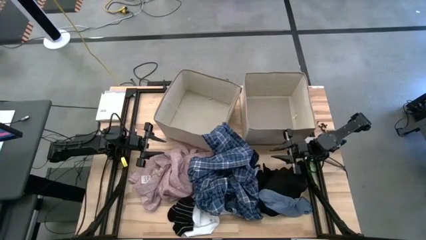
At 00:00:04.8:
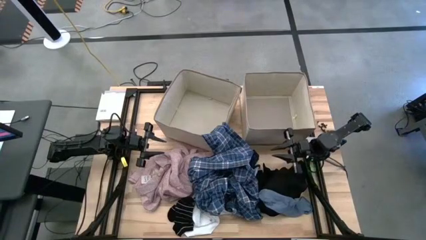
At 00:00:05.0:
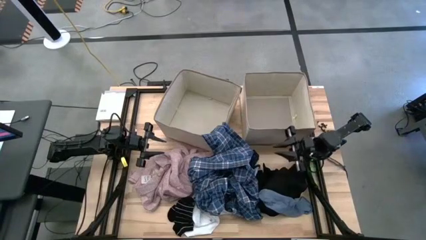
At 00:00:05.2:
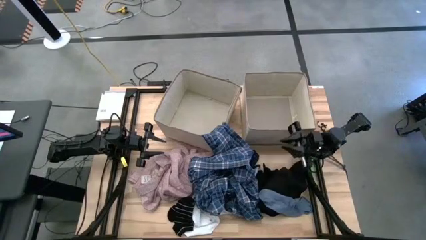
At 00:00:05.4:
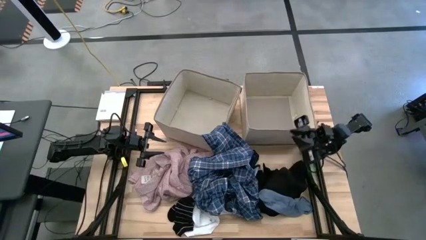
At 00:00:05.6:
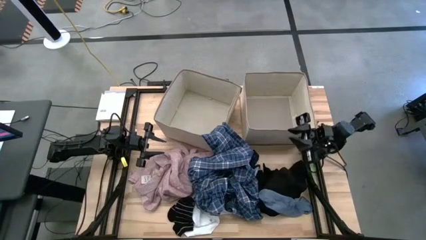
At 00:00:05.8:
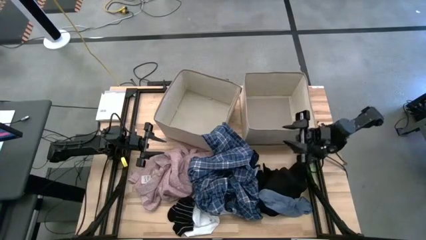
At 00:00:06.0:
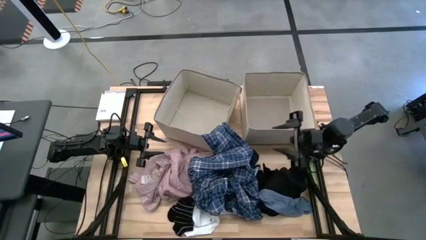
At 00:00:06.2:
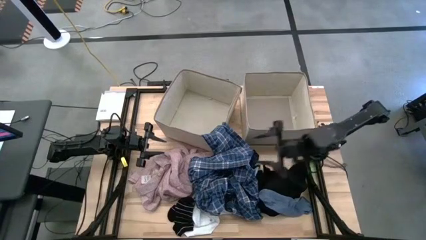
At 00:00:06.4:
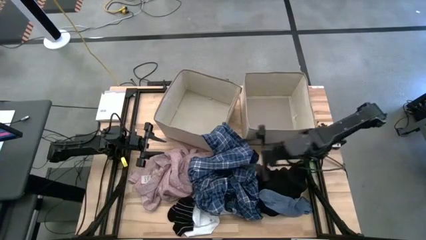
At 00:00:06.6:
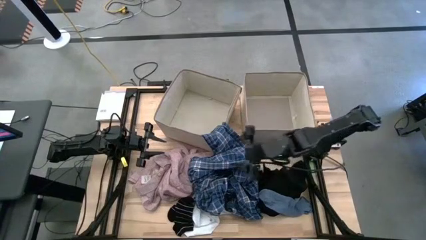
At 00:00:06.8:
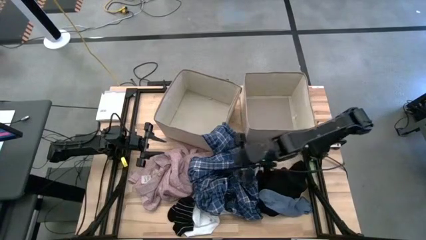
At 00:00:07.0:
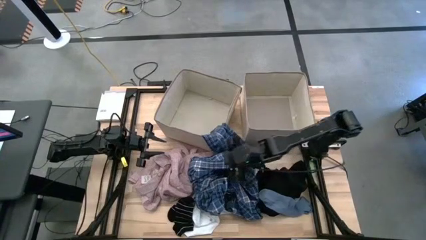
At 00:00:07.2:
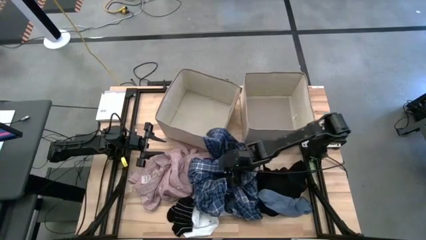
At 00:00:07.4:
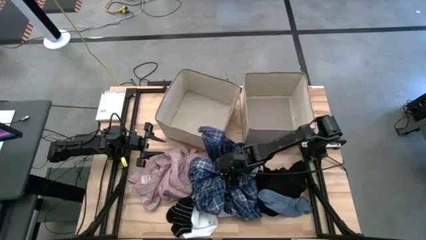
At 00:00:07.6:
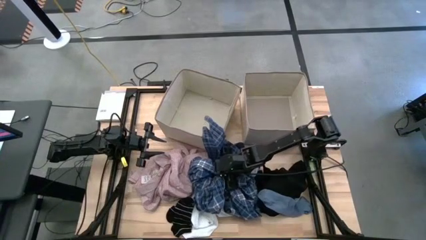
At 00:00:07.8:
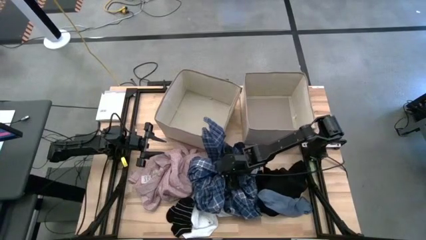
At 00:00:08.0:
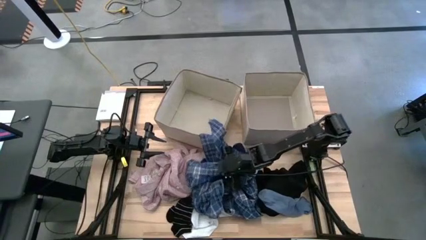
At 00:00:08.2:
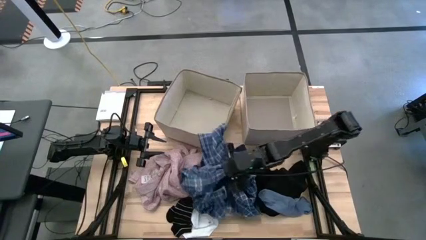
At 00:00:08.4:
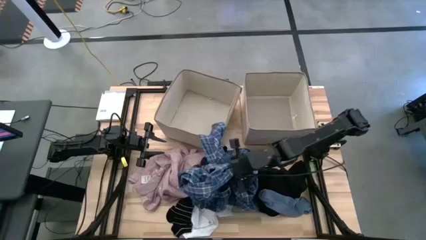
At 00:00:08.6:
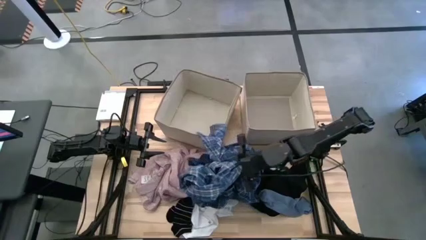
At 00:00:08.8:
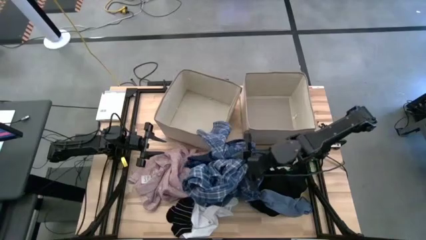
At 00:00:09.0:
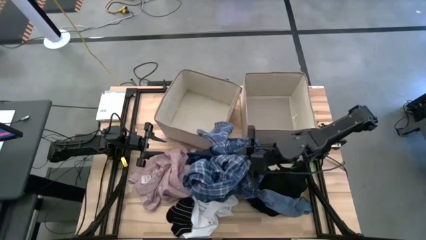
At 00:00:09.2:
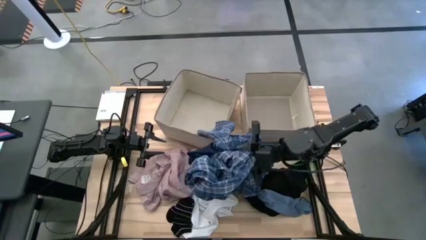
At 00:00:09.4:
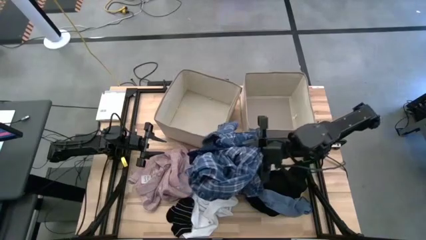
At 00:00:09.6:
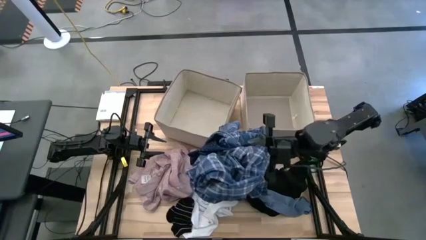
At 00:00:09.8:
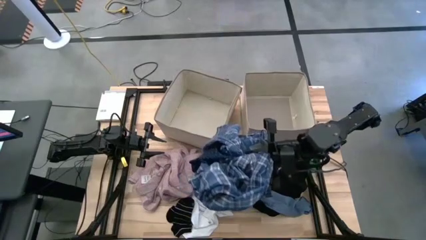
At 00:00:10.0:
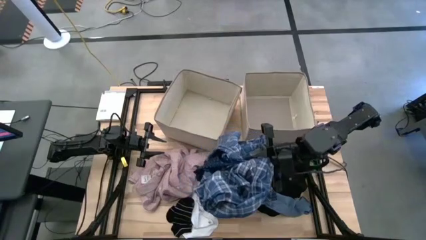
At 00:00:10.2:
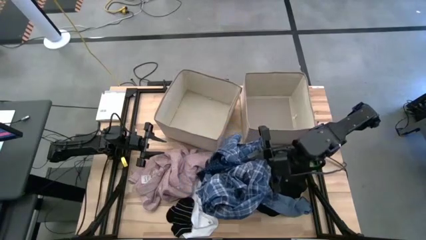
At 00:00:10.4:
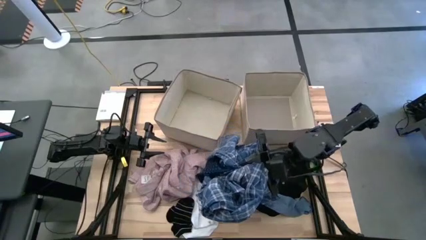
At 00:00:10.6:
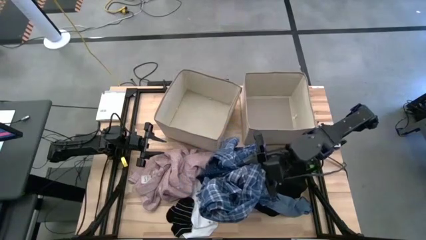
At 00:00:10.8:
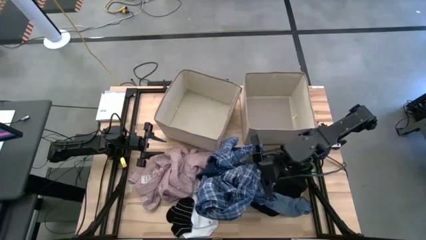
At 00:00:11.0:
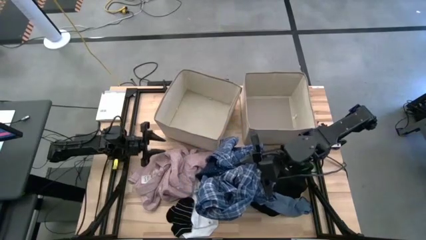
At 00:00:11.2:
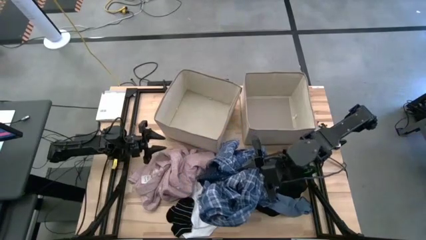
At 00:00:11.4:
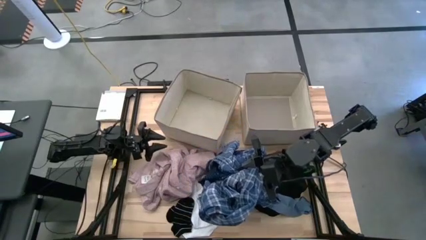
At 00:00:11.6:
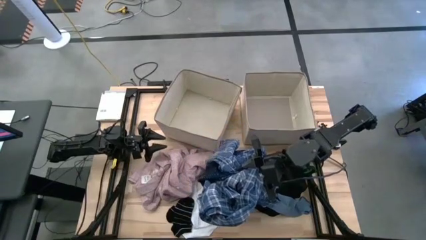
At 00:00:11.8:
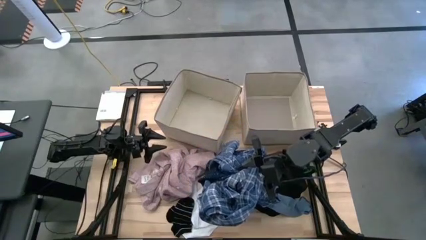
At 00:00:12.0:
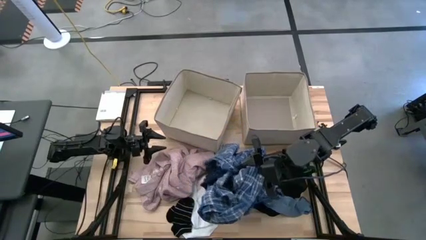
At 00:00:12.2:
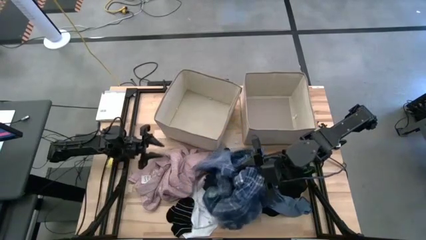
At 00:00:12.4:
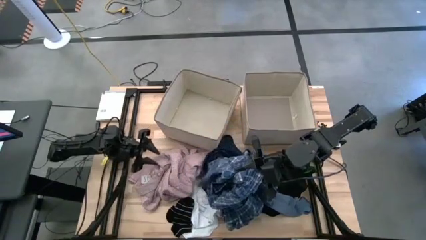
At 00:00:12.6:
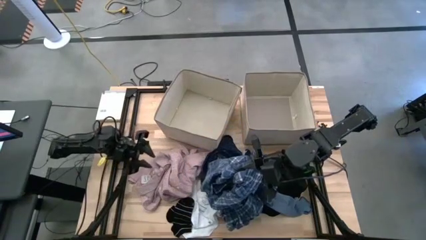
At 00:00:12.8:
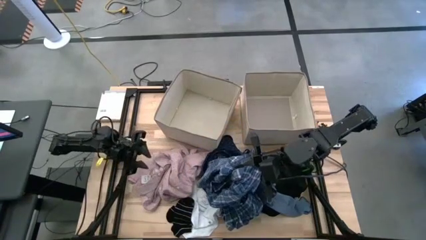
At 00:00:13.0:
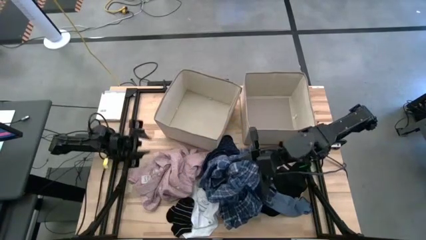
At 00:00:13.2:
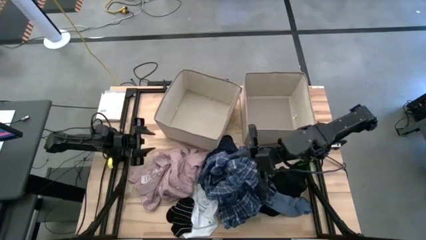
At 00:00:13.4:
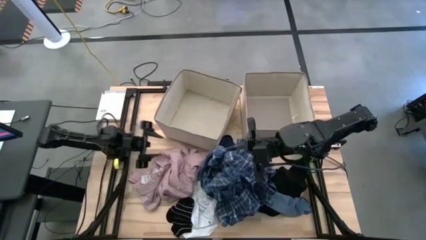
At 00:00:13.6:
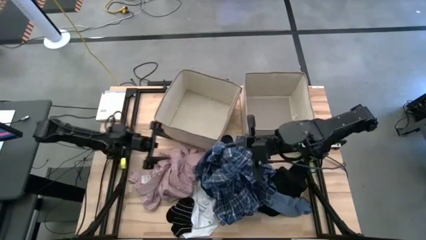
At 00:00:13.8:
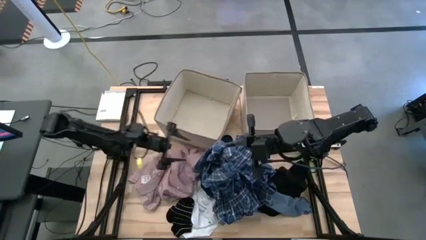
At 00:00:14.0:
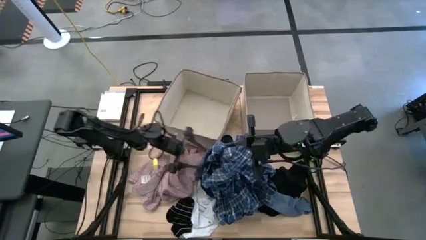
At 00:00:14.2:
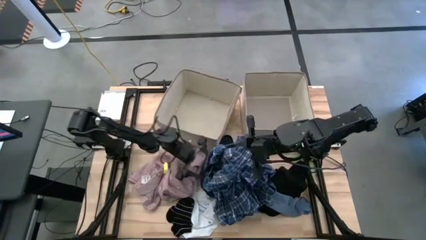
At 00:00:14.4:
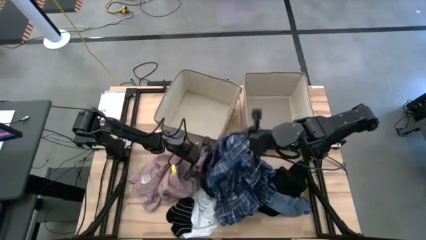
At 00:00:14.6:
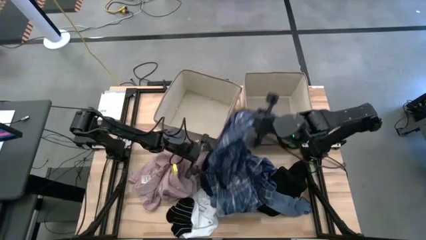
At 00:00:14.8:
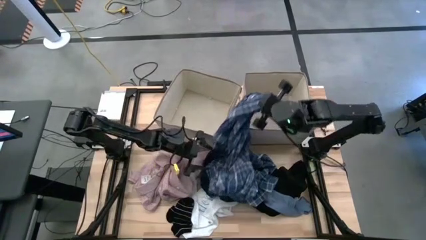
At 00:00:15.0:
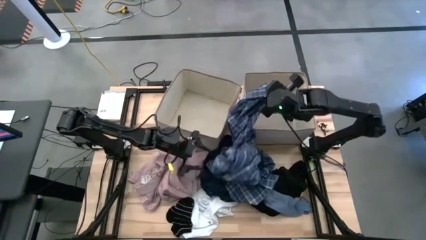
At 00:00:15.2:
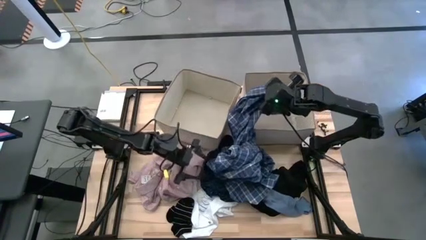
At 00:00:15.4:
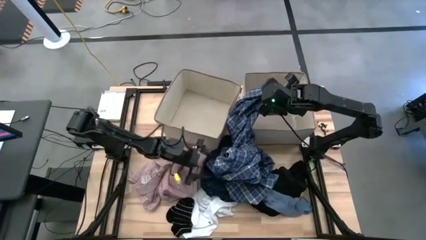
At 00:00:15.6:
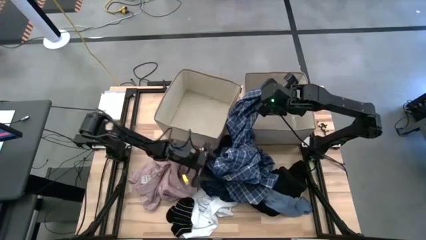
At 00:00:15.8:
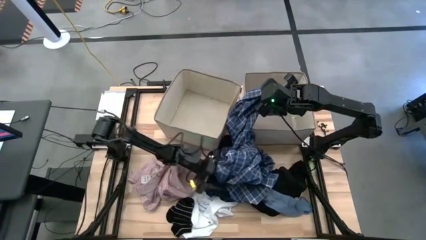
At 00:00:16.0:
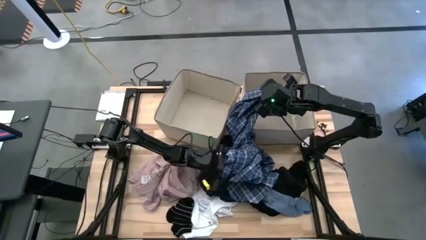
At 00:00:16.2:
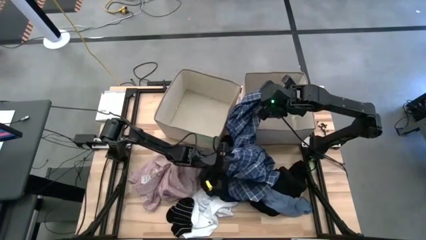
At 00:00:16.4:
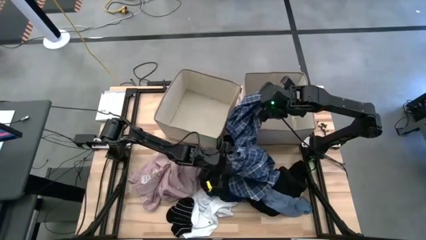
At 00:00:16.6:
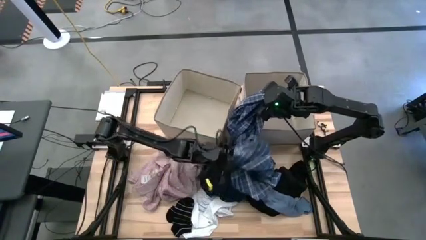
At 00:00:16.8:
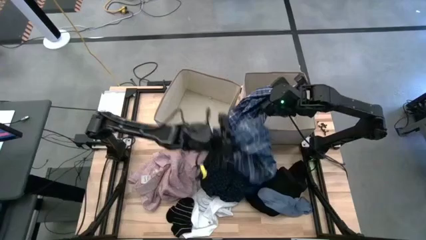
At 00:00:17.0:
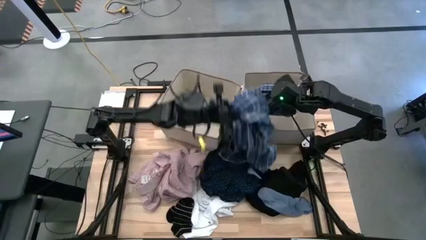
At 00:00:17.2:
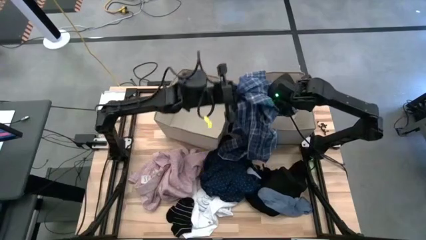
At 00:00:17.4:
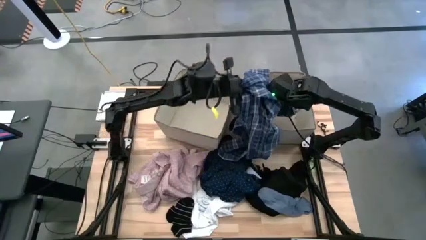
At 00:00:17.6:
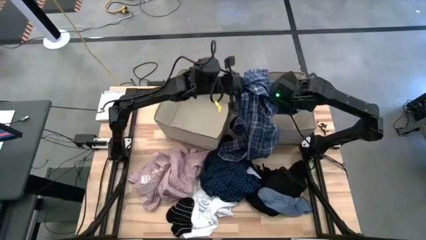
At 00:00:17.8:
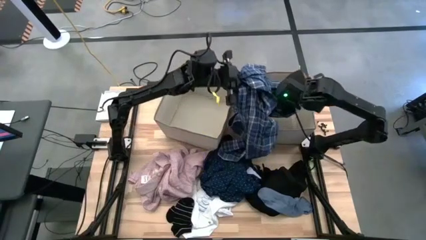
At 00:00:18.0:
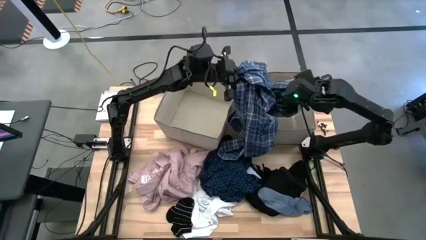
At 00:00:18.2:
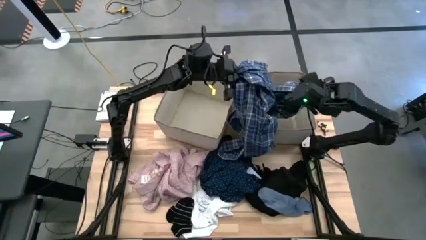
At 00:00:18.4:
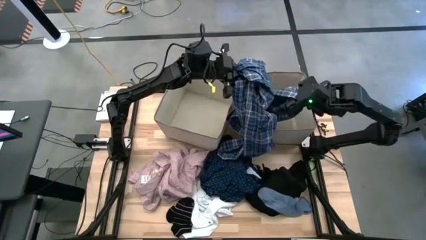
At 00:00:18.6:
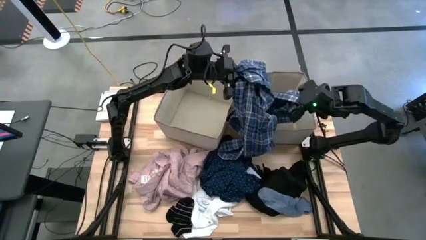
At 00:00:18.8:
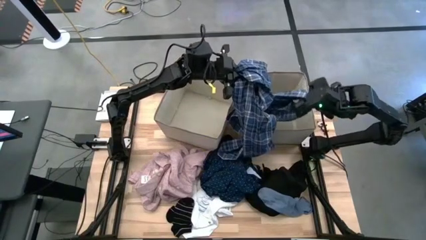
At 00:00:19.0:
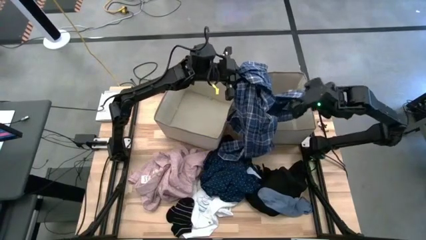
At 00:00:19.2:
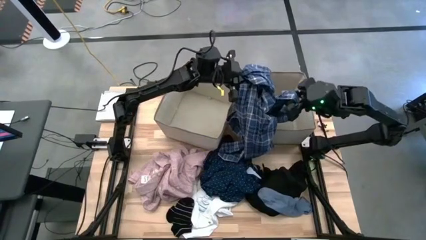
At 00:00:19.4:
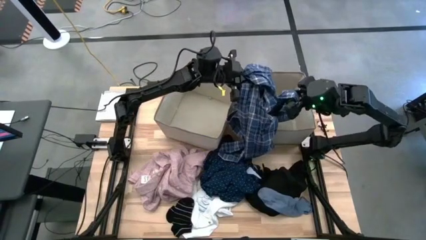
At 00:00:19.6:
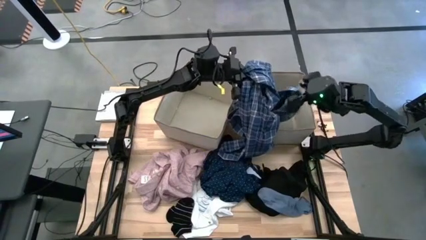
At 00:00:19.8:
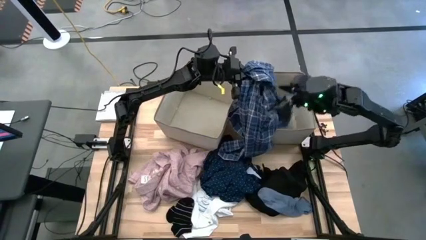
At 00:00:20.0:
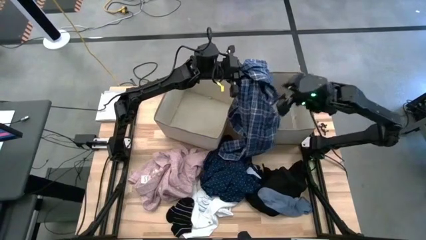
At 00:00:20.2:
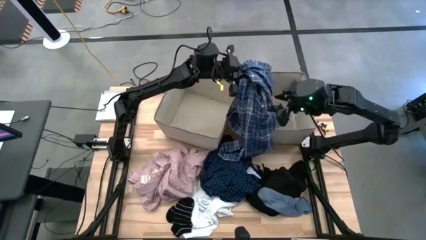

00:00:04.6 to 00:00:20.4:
Task: Sort clothes
Put the blue plaid shirt into the right laundry organizer
